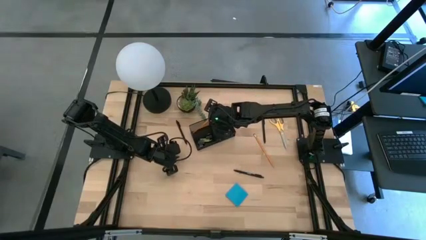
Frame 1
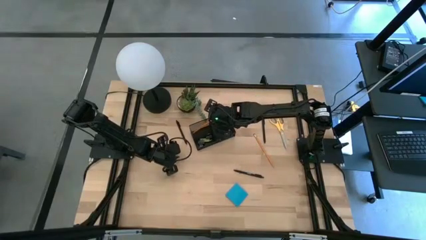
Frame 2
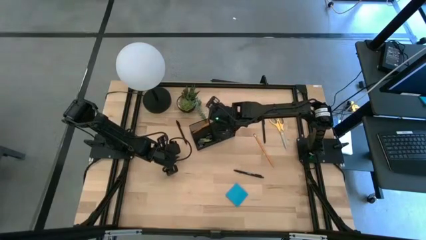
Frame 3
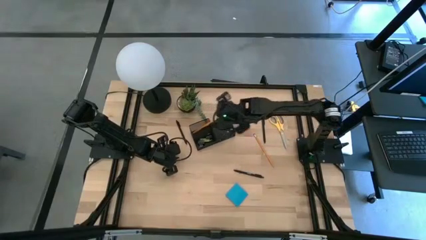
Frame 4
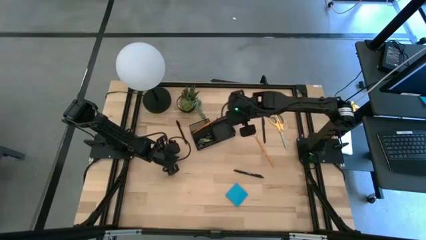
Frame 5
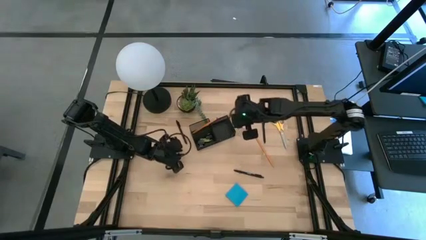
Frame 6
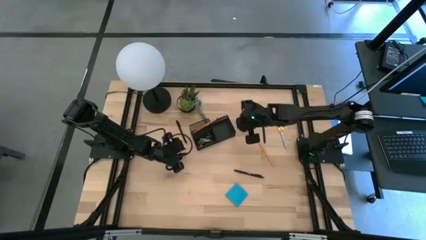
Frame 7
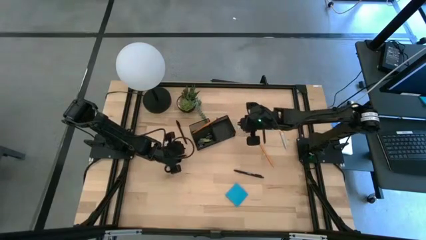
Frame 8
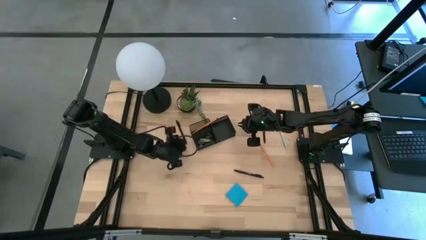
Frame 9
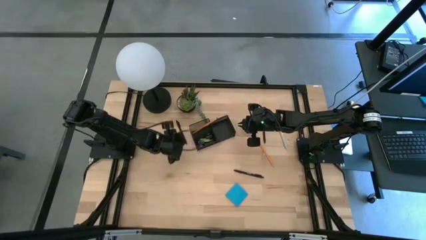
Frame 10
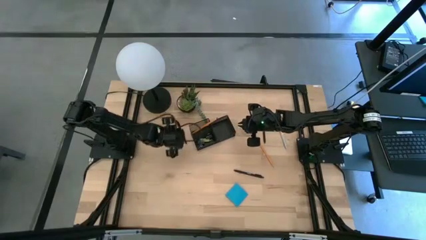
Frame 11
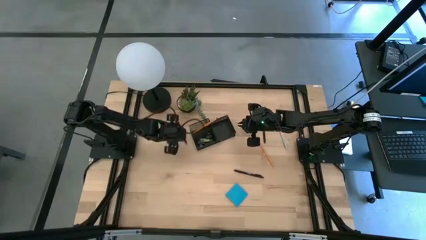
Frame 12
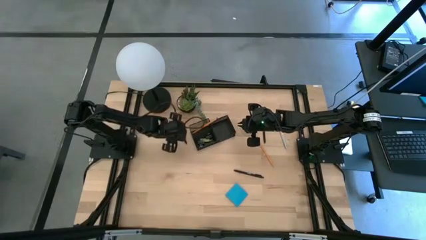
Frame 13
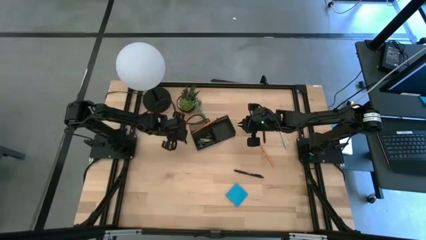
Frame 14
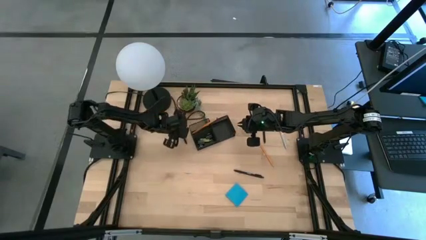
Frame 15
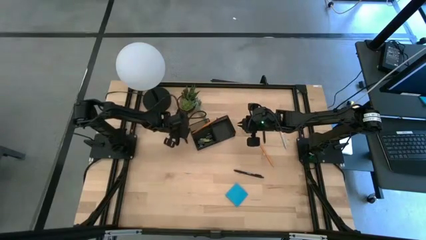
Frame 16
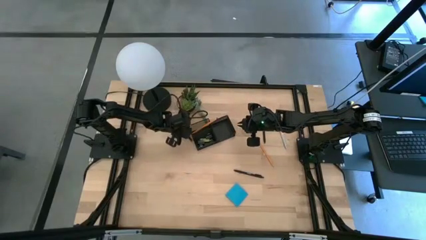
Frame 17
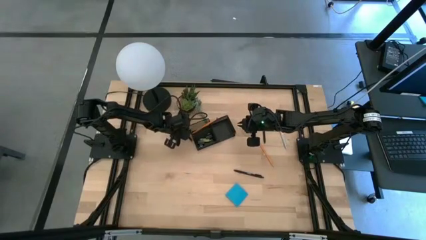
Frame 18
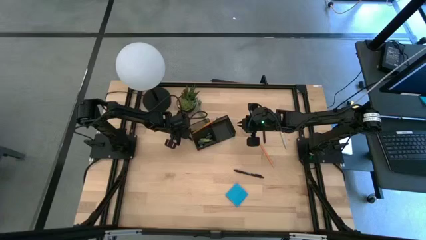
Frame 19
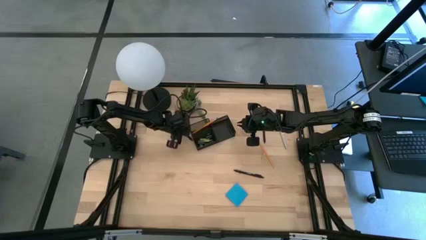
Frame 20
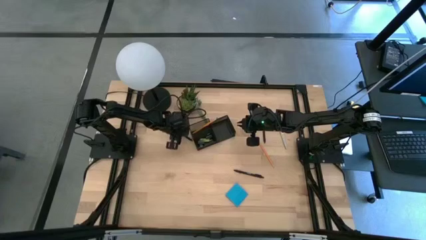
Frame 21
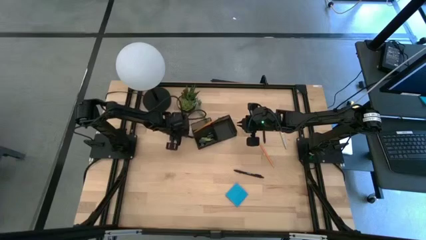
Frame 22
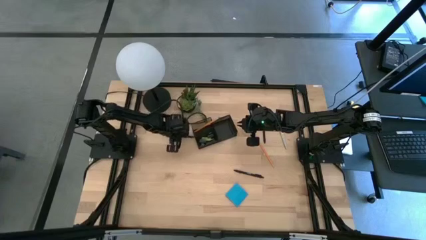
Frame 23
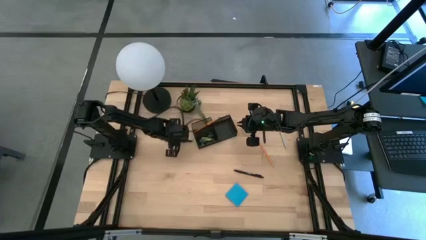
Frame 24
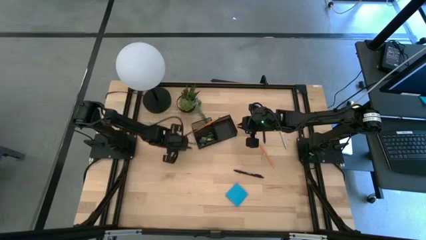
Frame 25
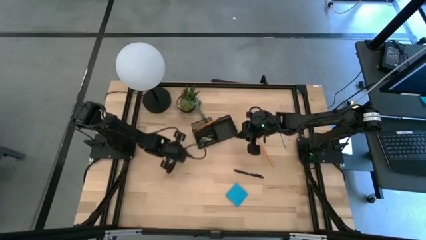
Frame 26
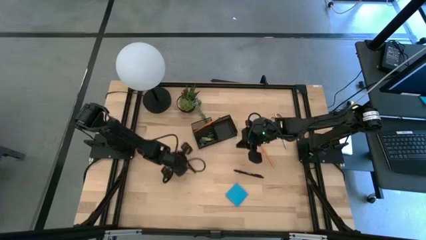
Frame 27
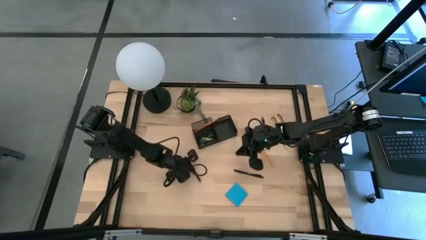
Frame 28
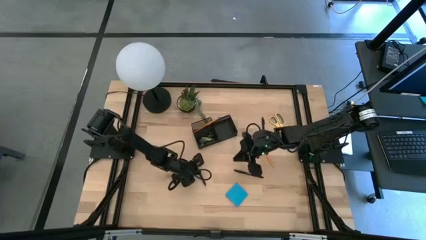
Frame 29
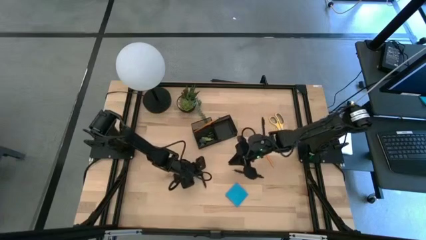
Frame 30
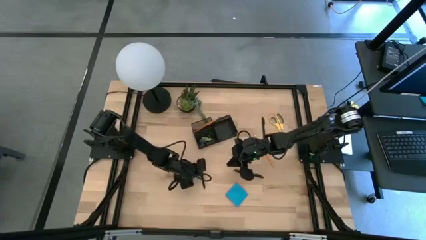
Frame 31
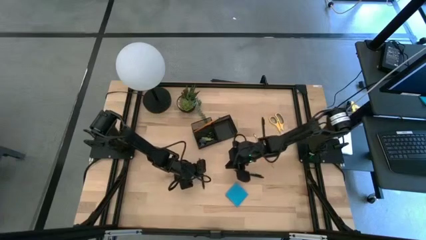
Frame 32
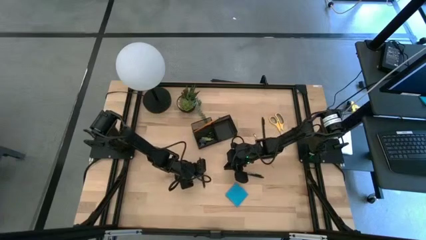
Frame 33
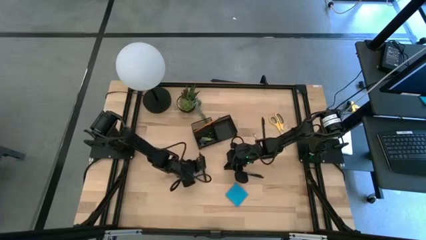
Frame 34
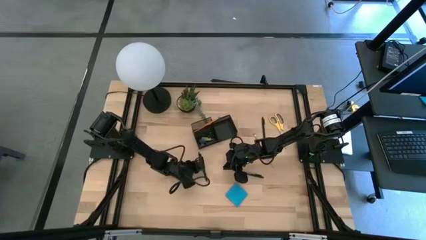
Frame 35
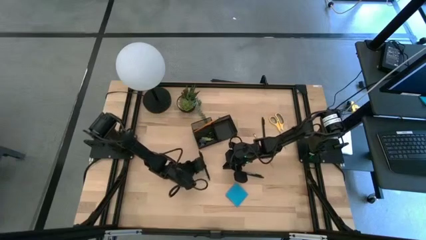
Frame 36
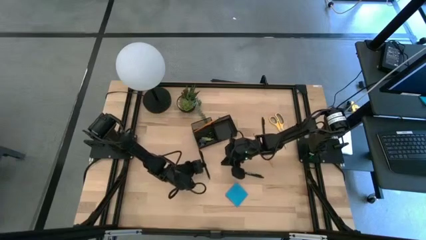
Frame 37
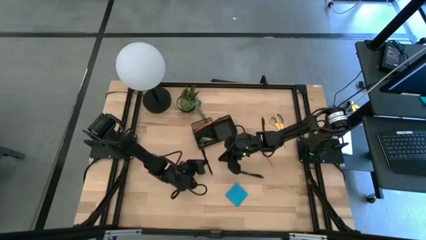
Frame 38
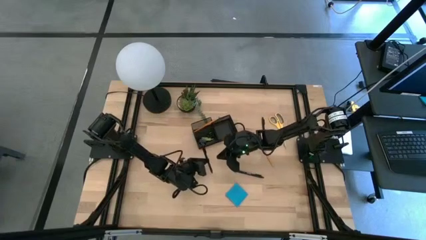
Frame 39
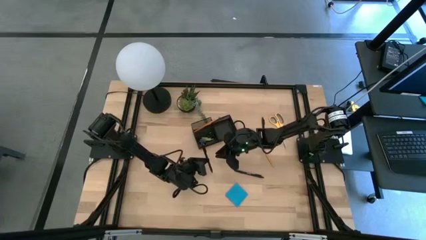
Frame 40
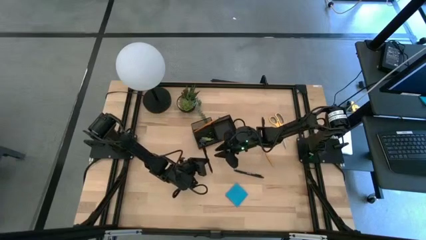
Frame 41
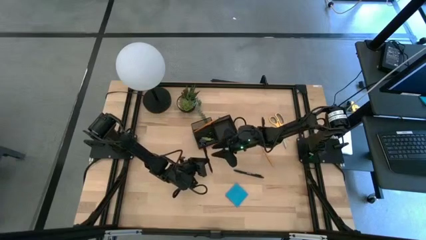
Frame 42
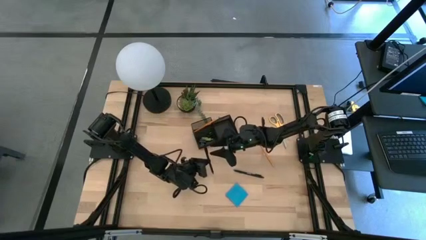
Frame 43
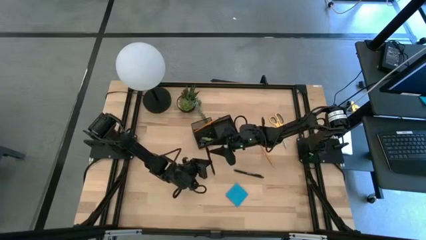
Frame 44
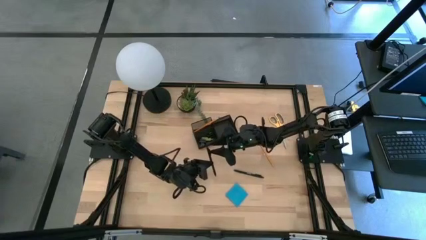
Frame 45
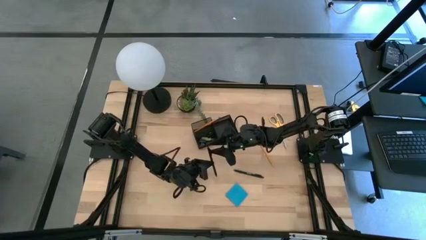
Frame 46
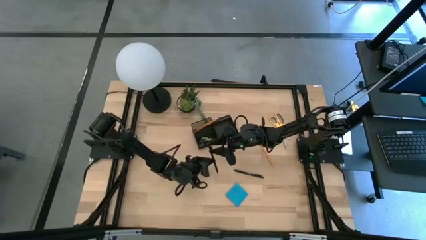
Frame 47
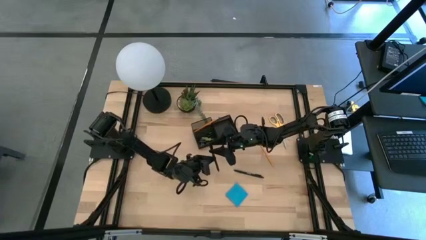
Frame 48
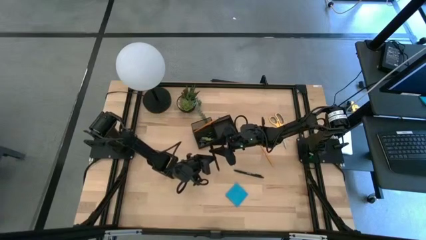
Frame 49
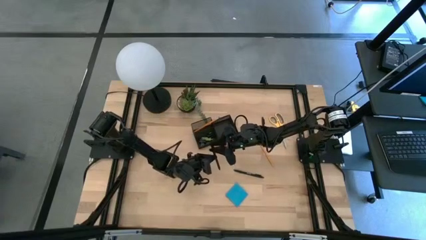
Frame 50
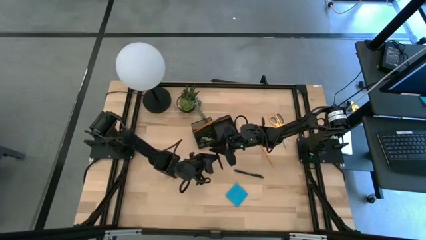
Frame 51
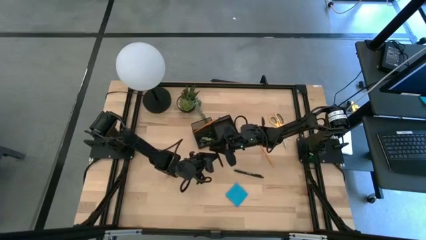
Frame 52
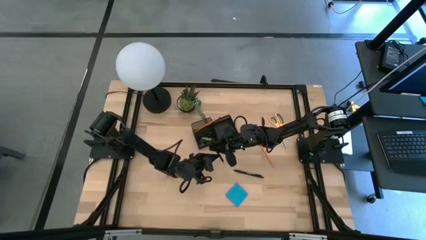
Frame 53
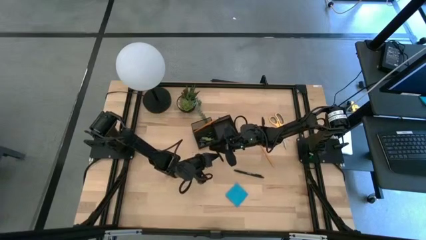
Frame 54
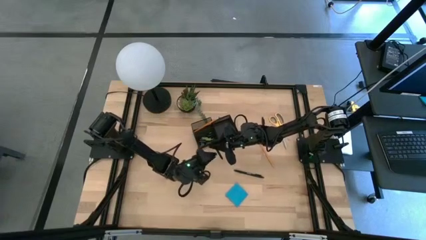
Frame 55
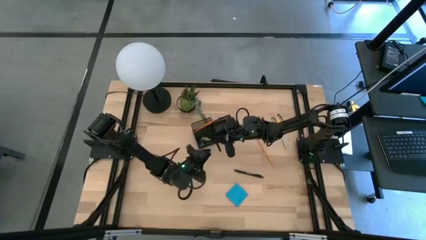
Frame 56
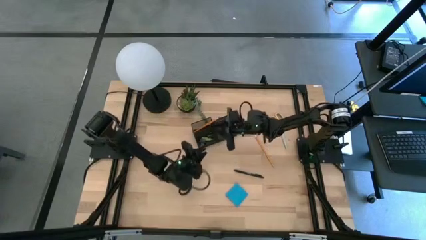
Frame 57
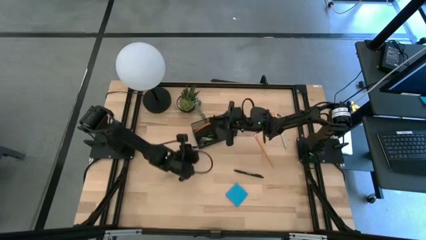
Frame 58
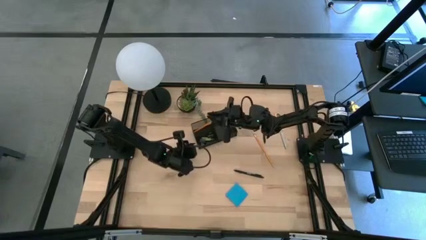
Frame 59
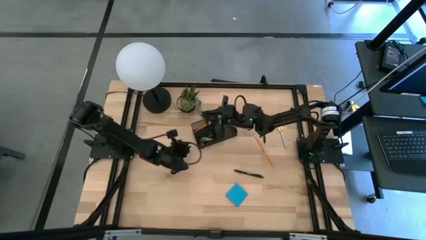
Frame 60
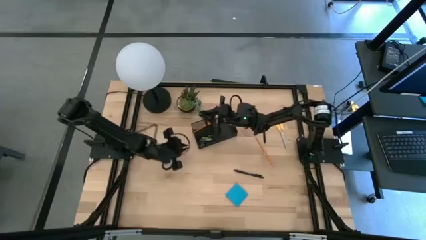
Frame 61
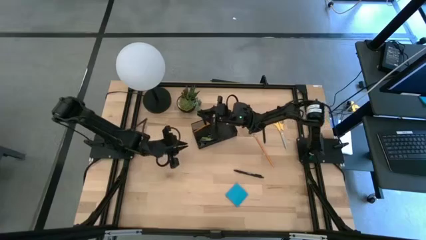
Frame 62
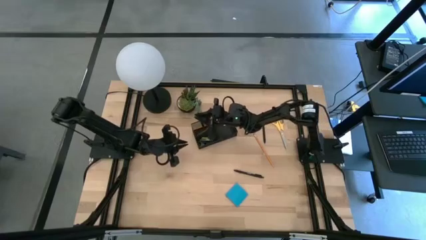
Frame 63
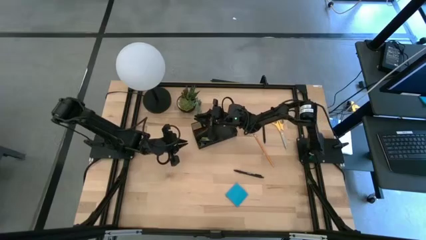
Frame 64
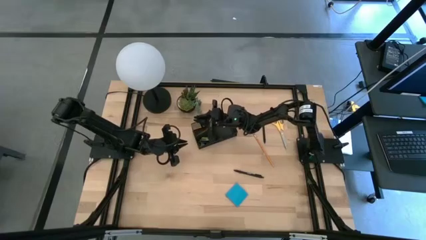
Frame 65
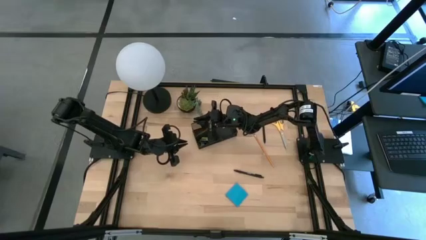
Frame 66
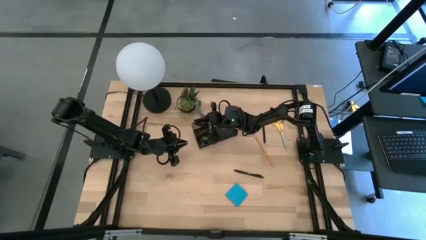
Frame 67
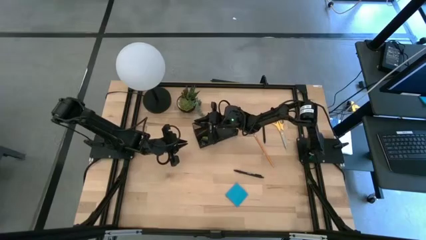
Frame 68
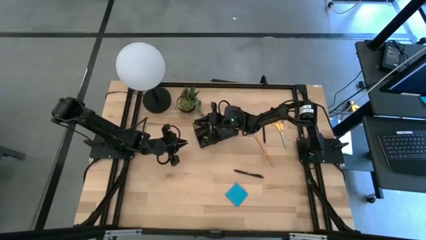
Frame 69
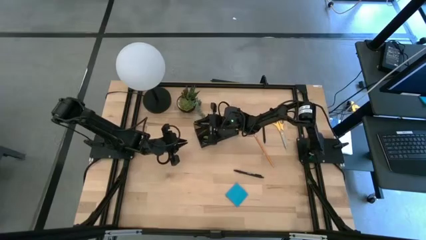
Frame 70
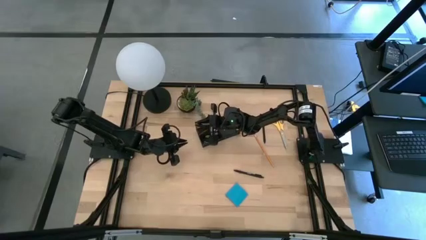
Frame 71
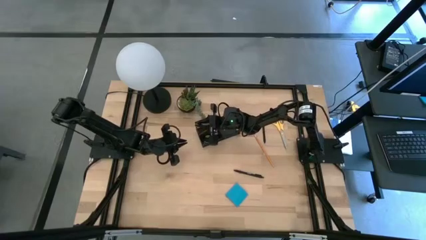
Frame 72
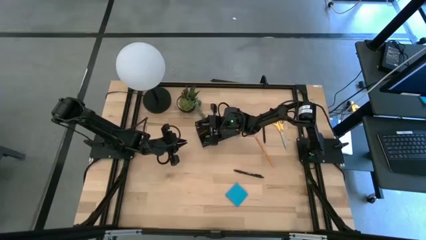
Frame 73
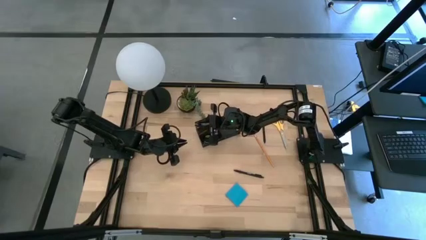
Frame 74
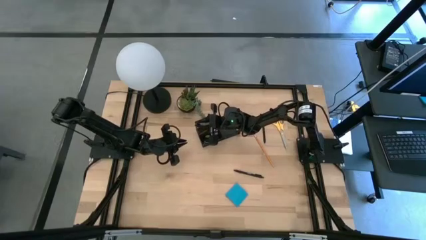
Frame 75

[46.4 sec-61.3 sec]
Task: Pick and place office supplies into organizer
Put the top left black pen into the desk organizer
